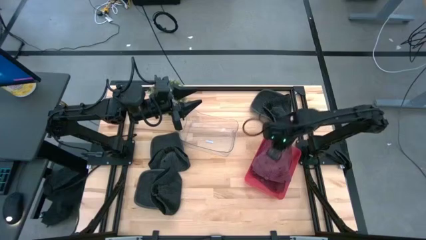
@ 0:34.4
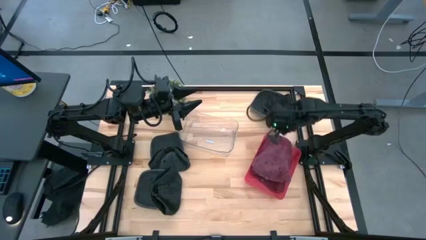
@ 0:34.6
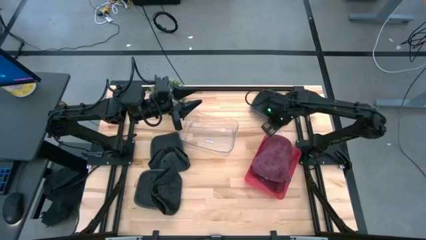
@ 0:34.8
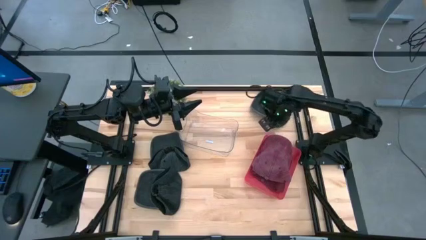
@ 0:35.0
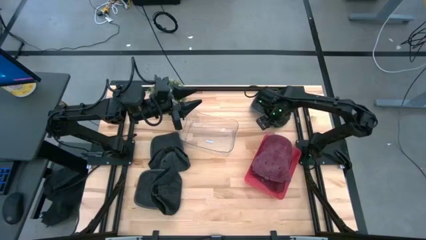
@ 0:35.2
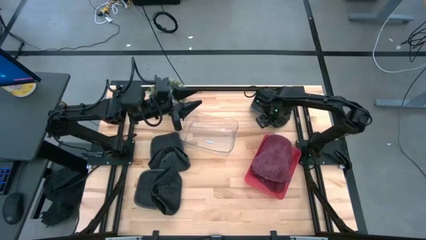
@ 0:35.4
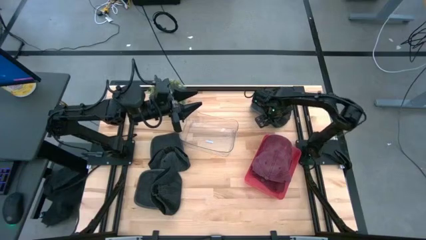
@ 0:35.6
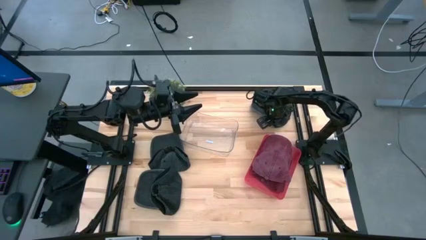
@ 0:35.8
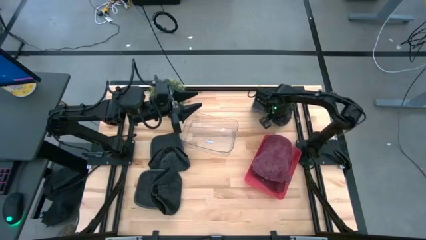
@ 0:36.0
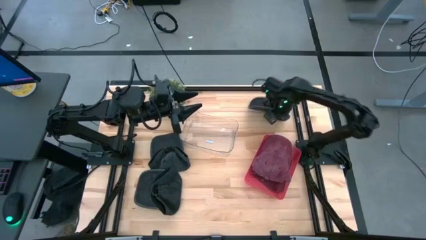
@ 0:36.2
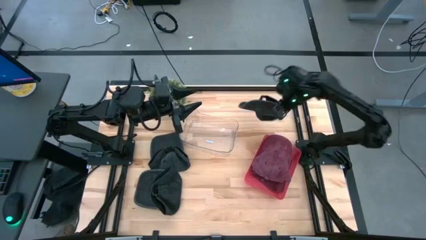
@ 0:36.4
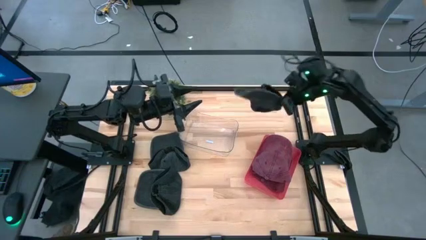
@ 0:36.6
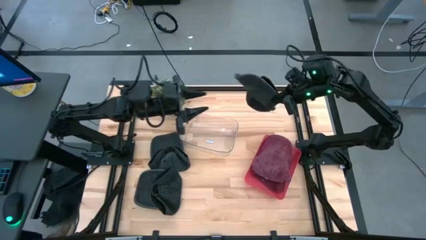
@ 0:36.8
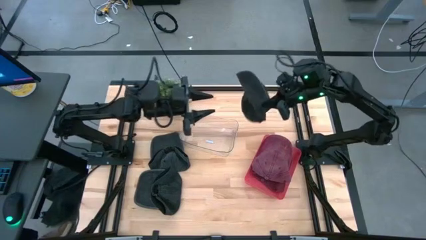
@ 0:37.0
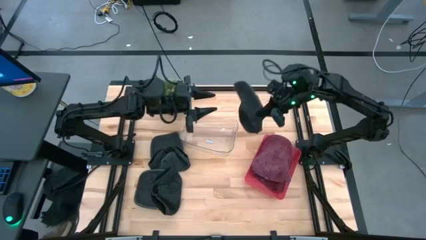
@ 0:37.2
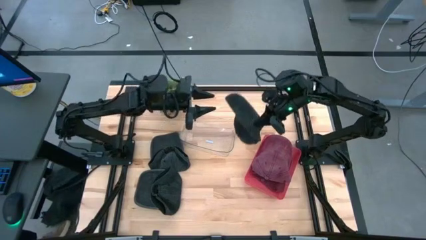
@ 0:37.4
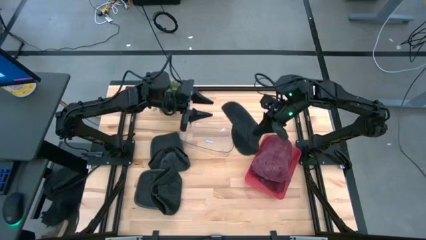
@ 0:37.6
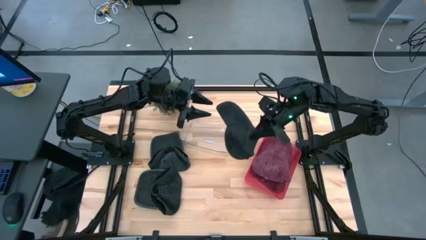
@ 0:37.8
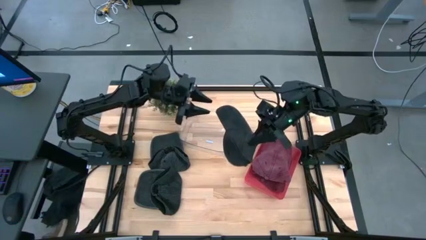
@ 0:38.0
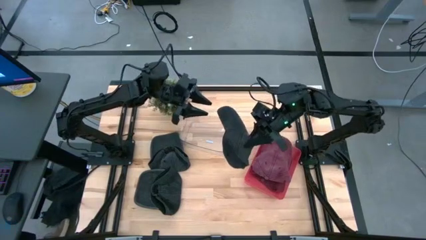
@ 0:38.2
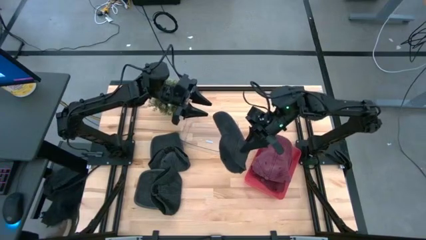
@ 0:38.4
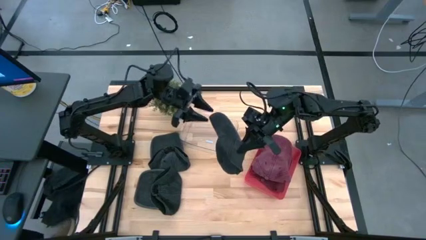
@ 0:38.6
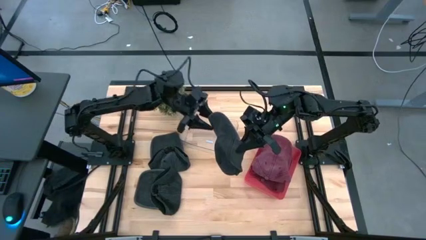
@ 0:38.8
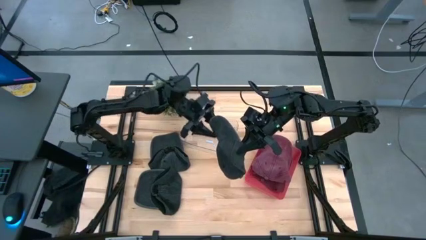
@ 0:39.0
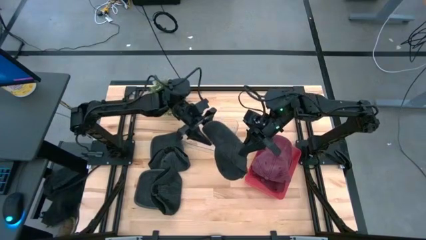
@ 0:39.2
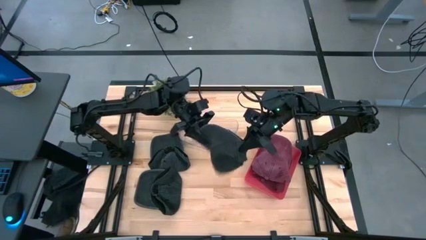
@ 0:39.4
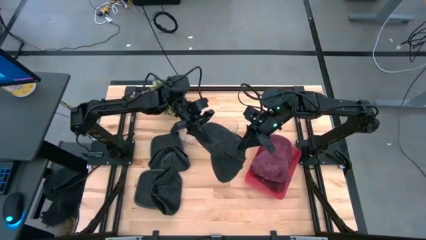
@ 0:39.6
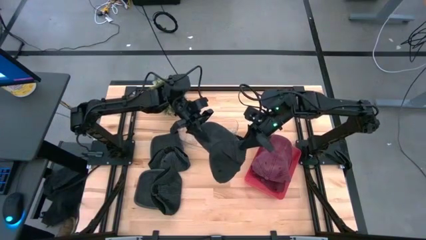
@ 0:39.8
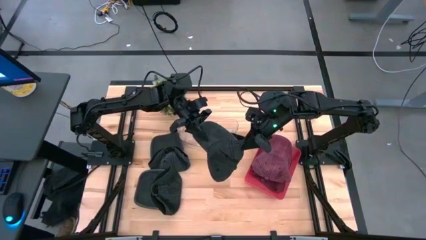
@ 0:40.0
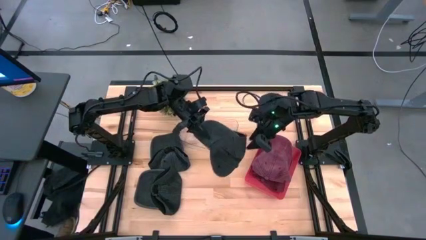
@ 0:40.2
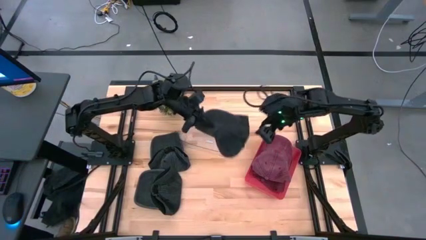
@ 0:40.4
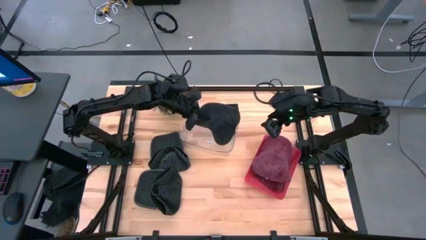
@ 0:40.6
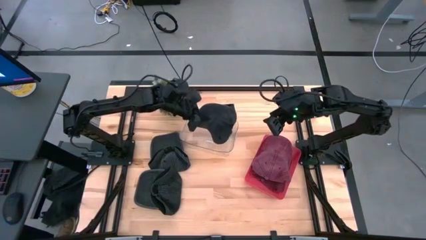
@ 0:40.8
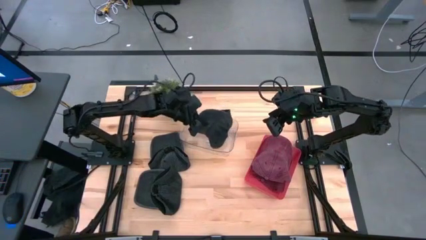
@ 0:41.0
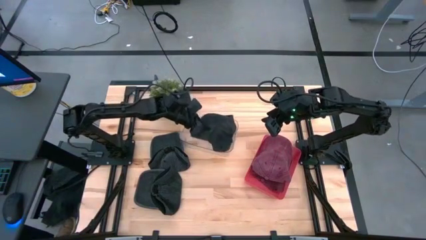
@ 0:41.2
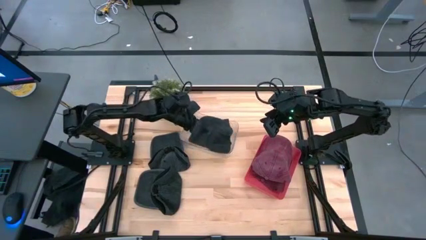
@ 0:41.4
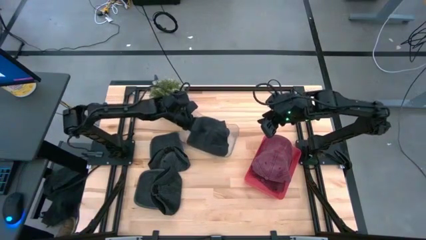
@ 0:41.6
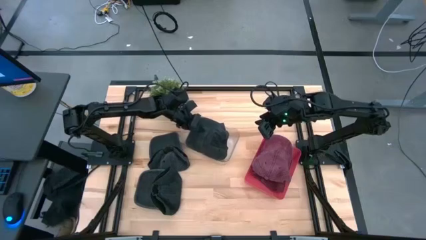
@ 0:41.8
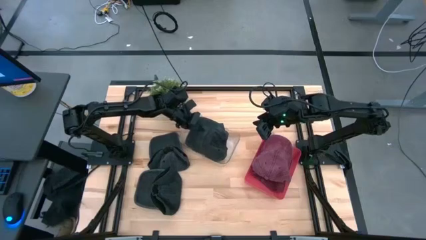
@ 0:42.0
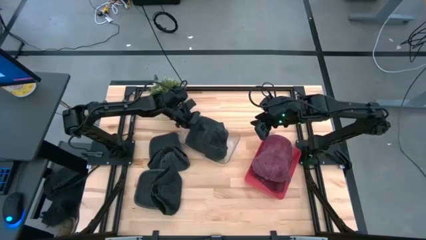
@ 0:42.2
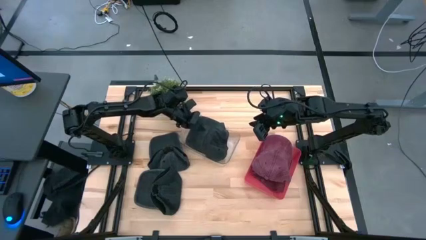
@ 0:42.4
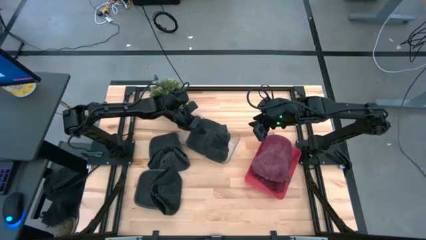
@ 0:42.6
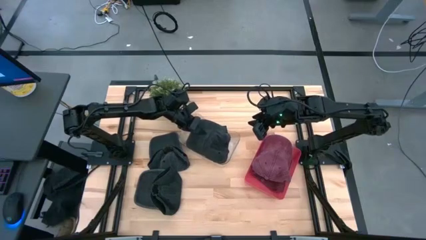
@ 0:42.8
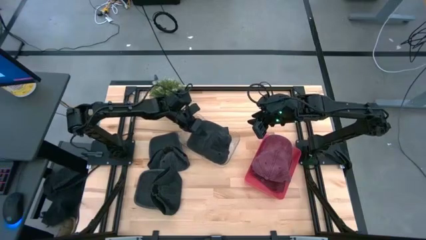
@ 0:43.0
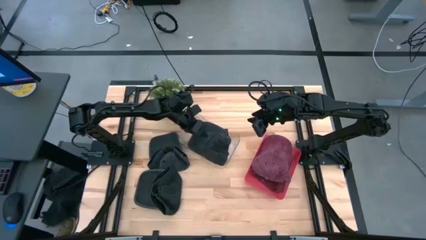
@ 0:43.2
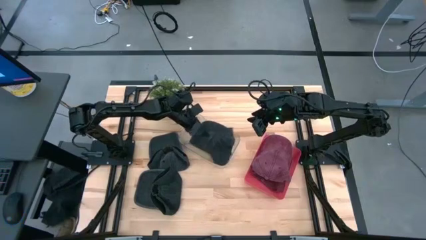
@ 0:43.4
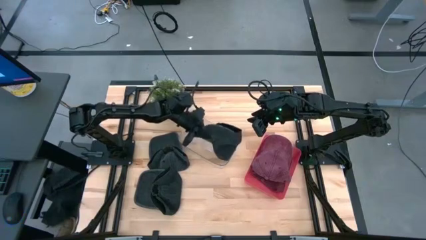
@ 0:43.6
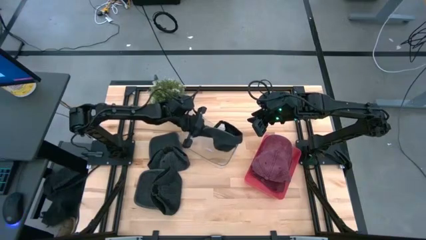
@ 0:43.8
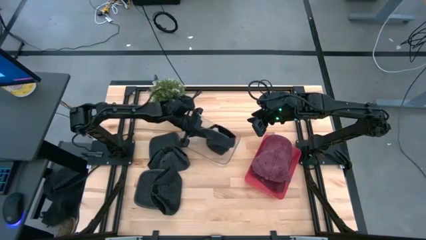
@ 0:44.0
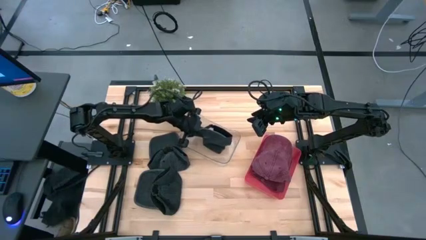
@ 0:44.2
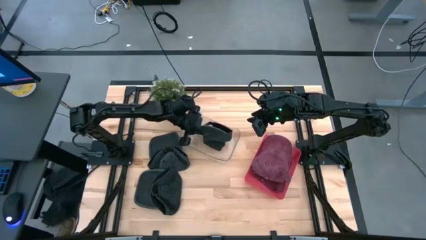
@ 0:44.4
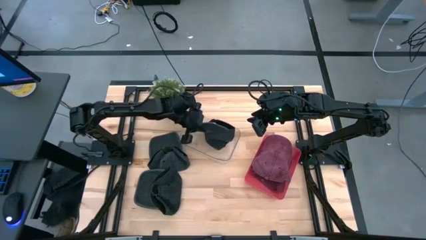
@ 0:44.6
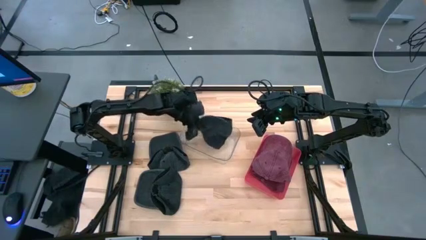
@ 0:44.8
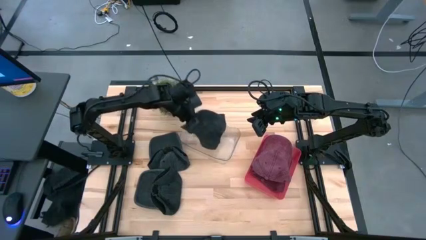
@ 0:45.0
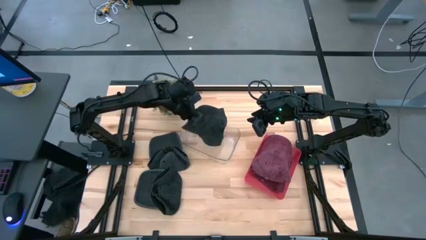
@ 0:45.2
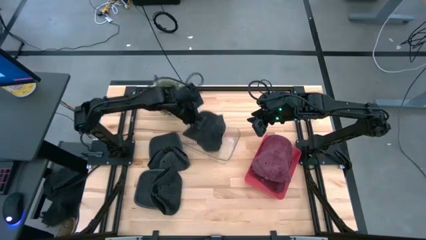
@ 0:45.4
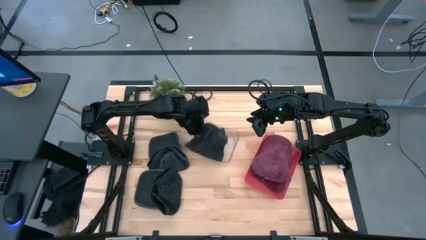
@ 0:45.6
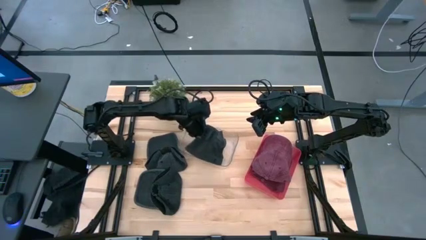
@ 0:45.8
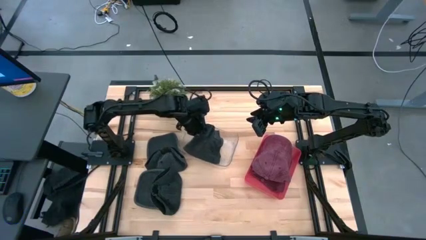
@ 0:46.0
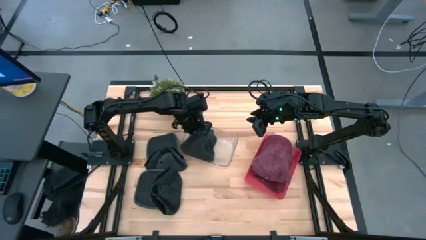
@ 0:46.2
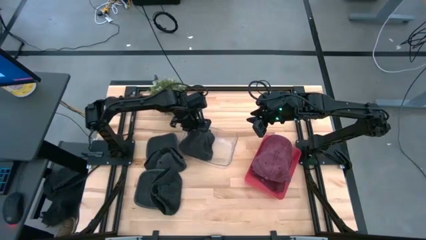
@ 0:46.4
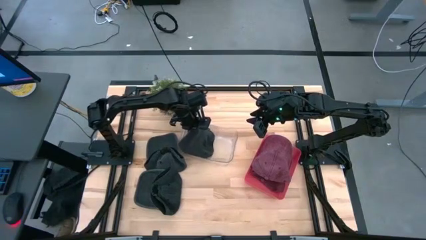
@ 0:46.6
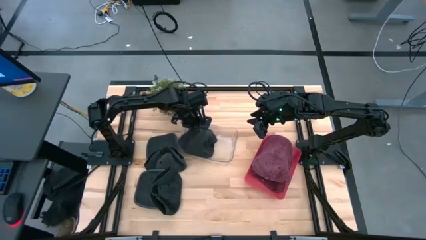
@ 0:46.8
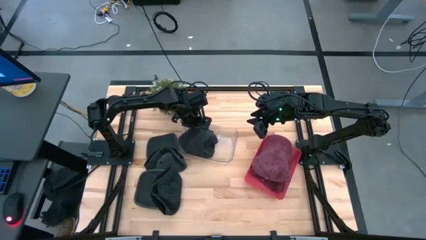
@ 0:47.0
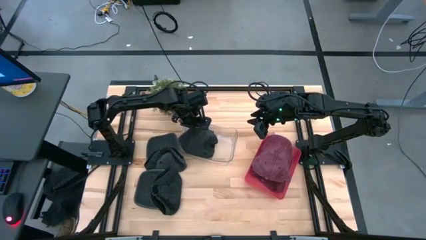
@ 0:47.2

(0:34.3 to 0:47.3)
Task: Pick & Place hat
Put the top black cap into the transparent bin

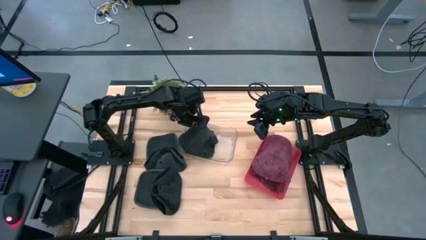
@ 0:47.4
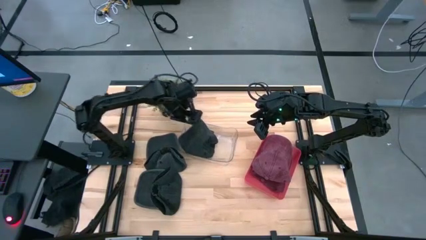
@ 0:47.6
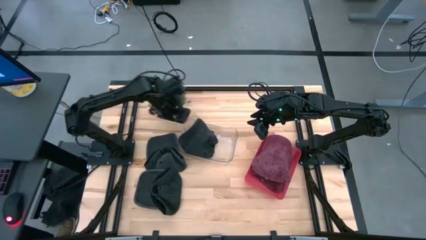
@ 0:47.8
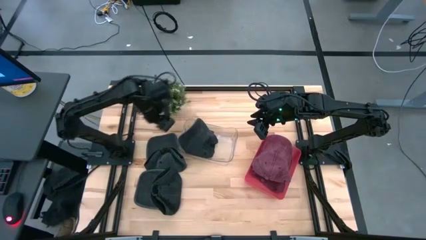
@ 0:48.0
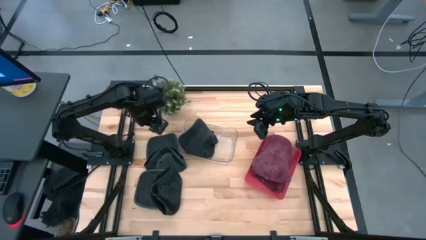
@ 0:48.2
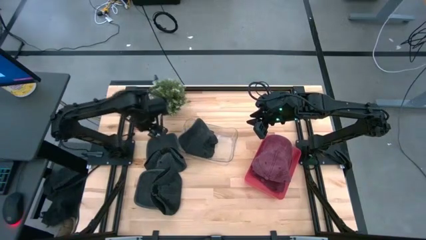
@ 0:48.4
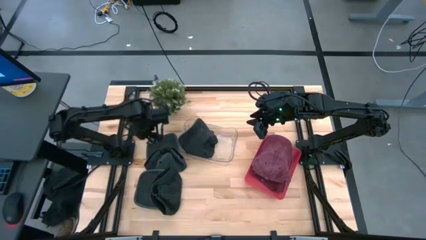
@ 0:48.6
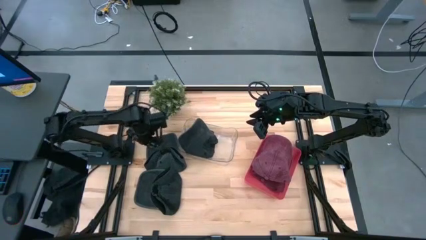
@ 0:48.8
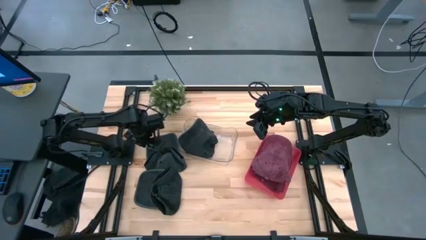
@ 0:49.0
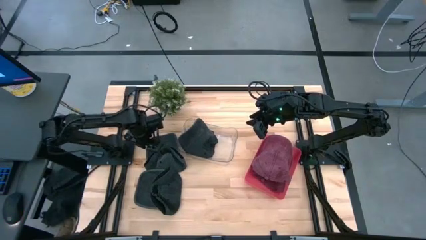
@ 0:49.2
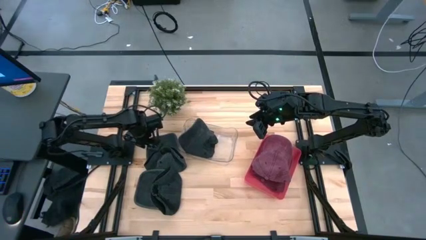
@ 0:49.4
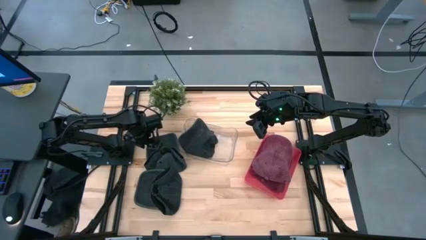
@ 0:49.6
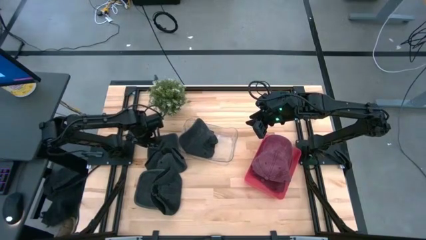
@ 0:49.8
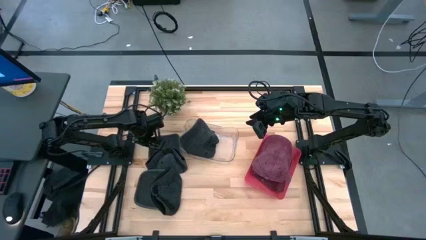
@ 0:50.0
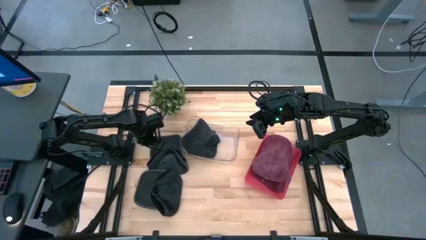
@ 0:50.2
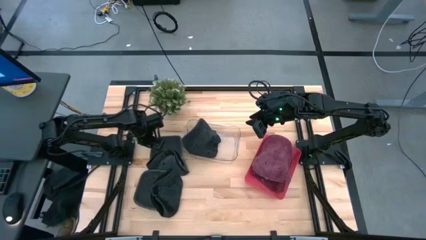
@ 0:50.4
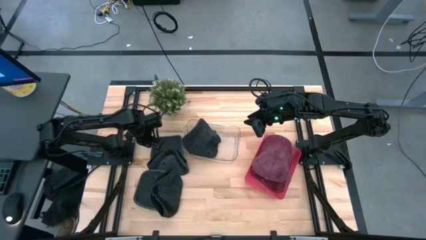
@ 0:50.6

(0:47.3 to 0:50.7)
Put the top black cap into the transparent bin
